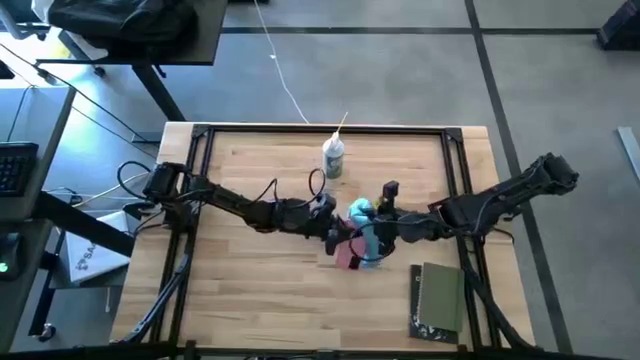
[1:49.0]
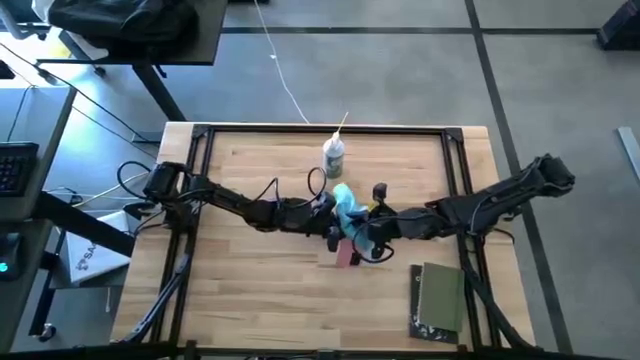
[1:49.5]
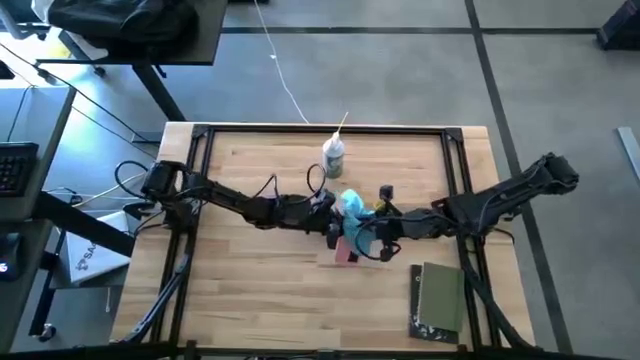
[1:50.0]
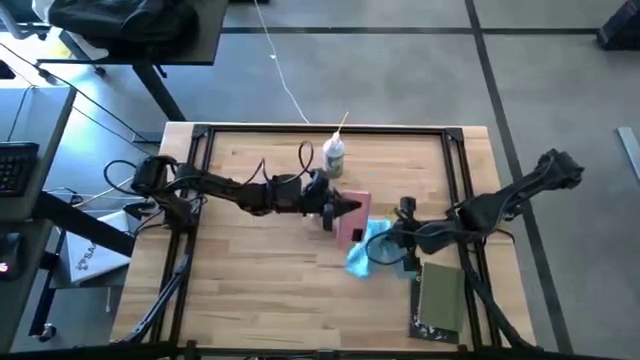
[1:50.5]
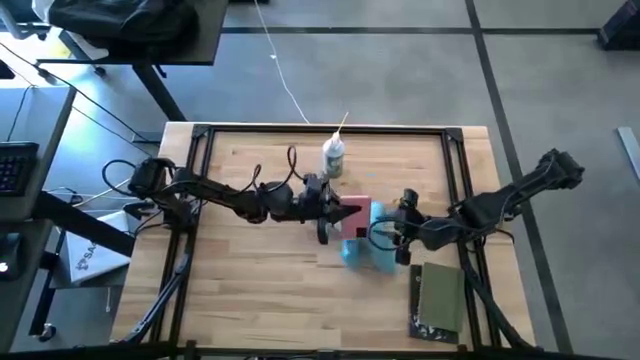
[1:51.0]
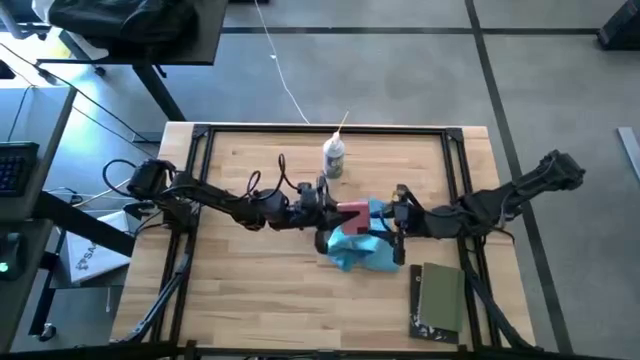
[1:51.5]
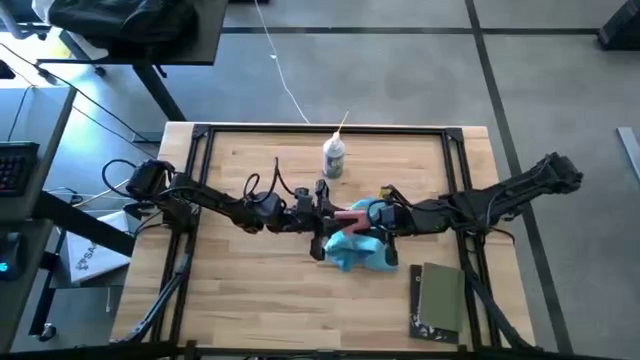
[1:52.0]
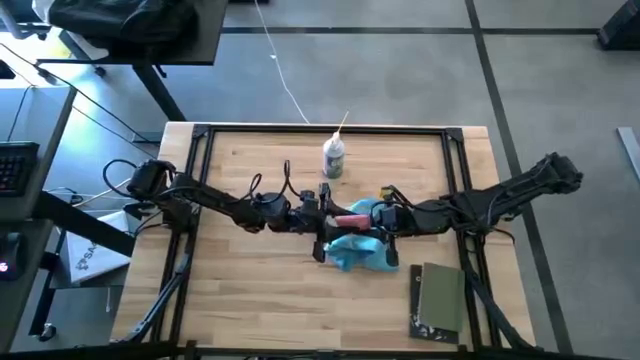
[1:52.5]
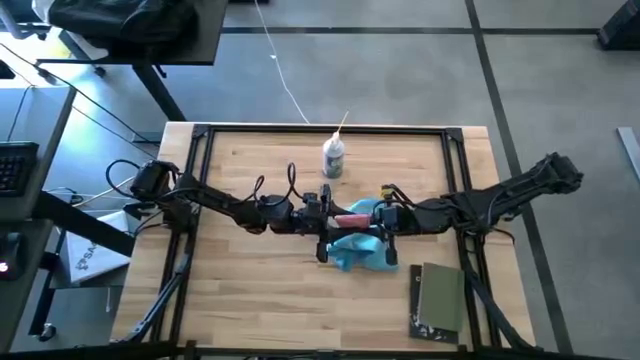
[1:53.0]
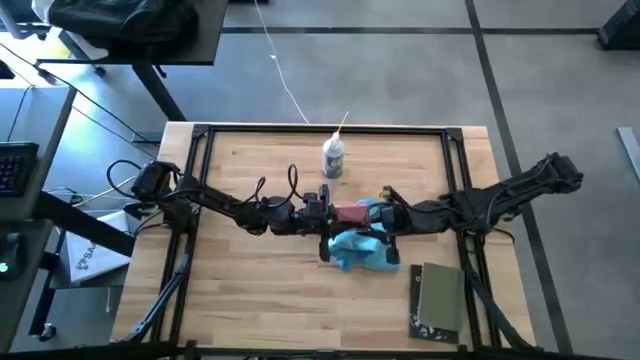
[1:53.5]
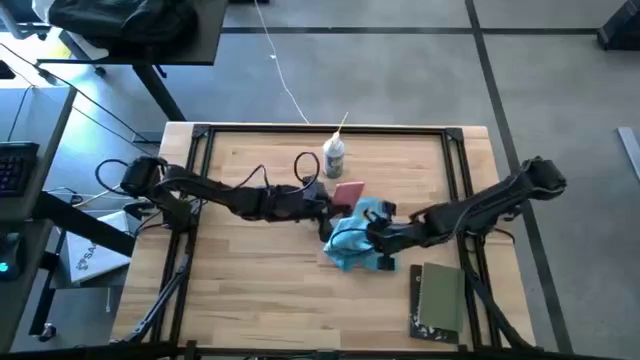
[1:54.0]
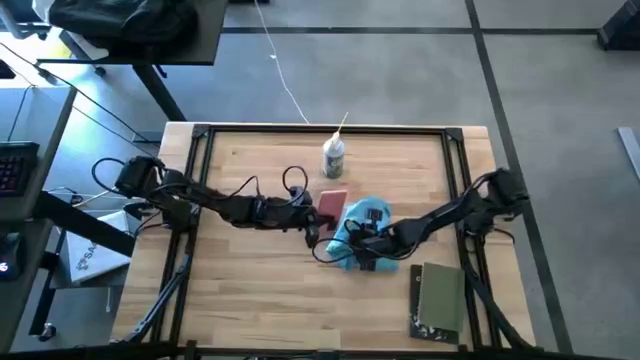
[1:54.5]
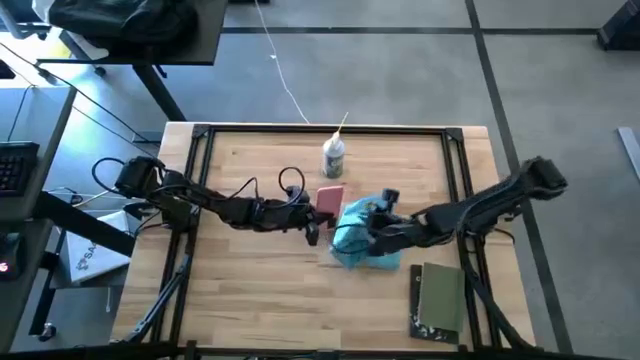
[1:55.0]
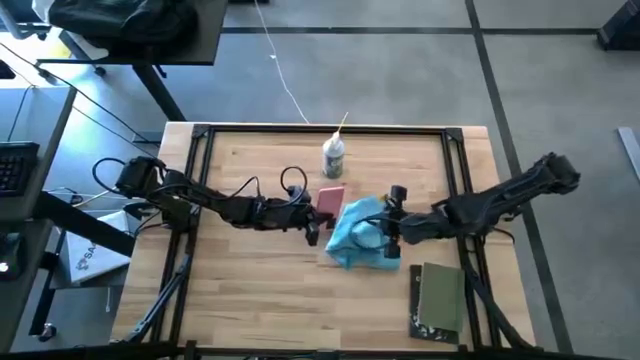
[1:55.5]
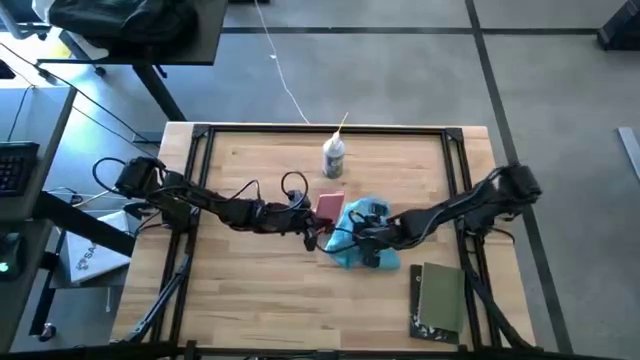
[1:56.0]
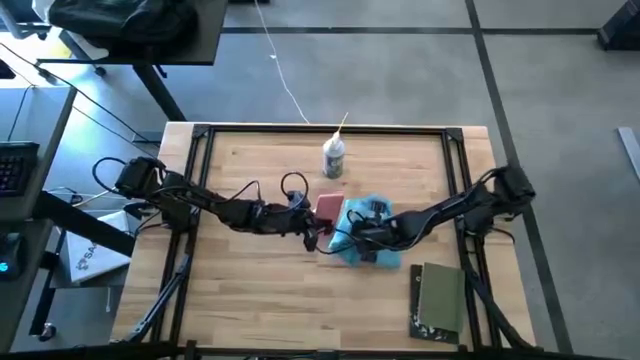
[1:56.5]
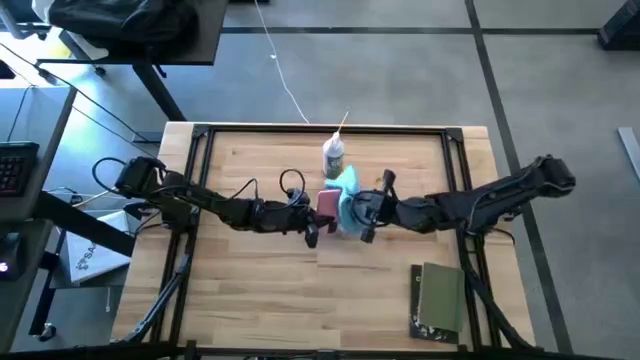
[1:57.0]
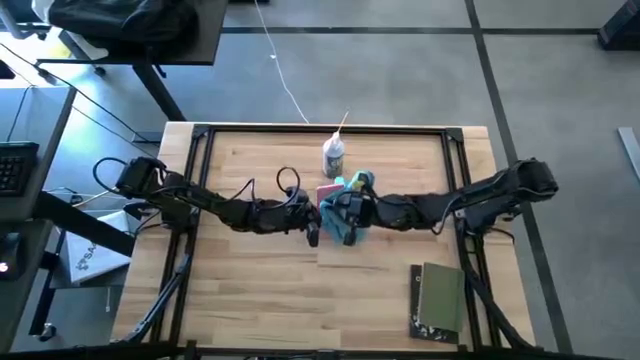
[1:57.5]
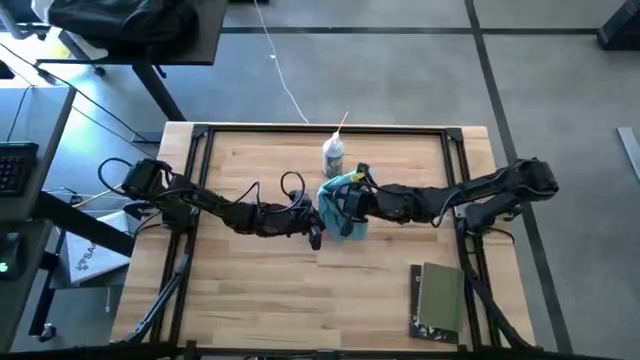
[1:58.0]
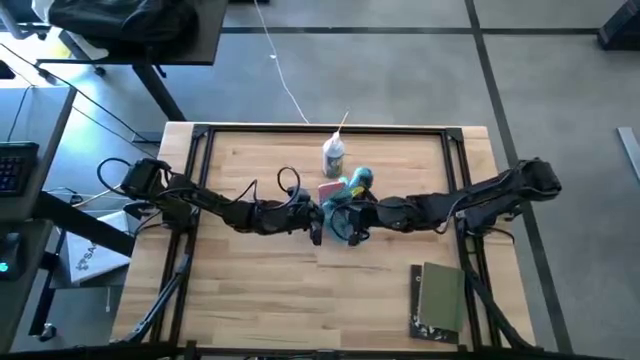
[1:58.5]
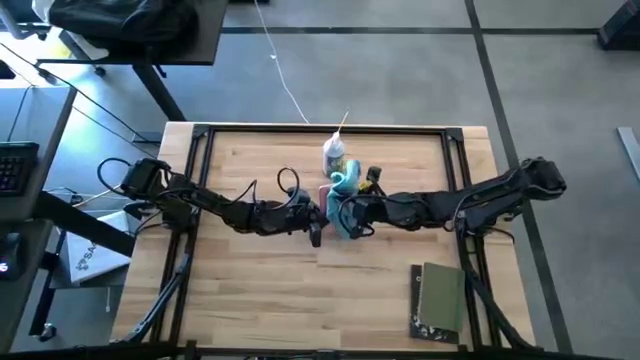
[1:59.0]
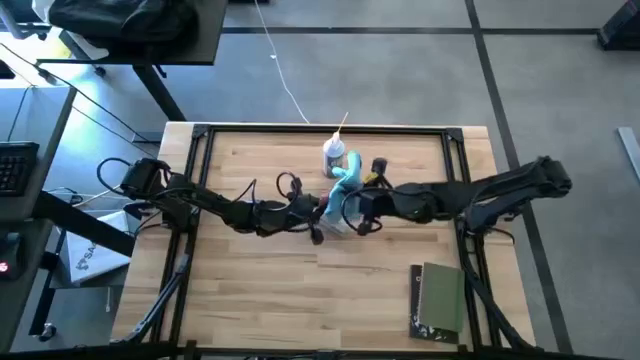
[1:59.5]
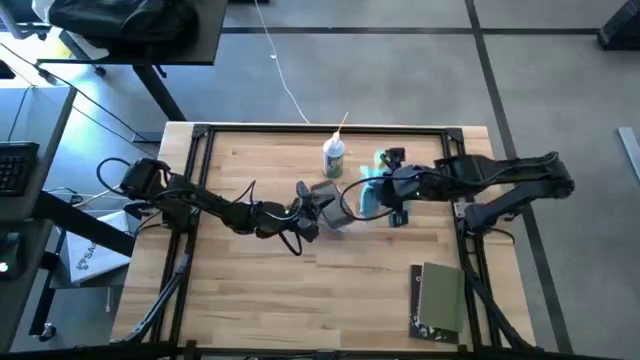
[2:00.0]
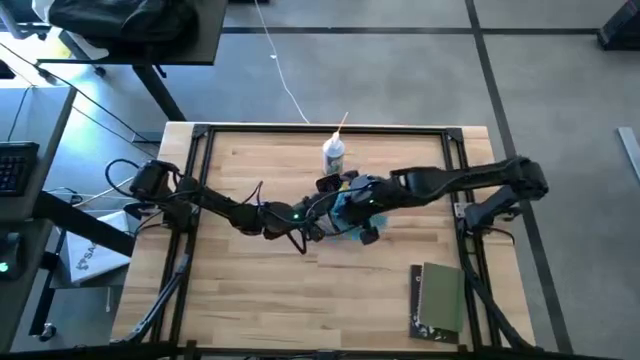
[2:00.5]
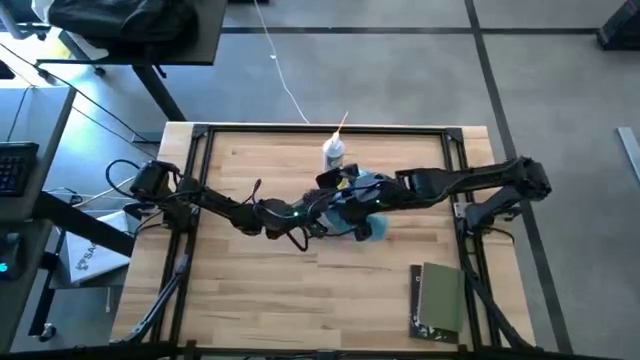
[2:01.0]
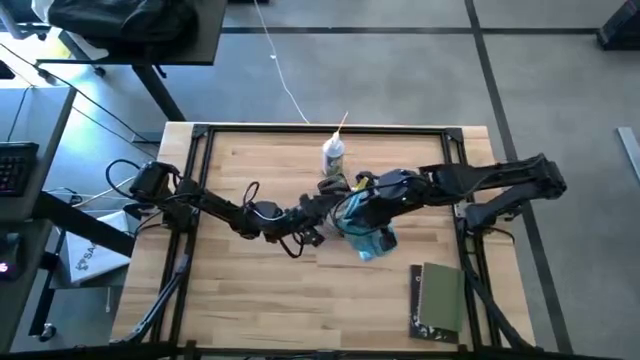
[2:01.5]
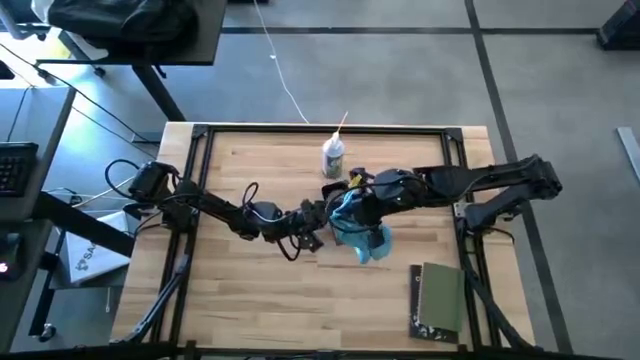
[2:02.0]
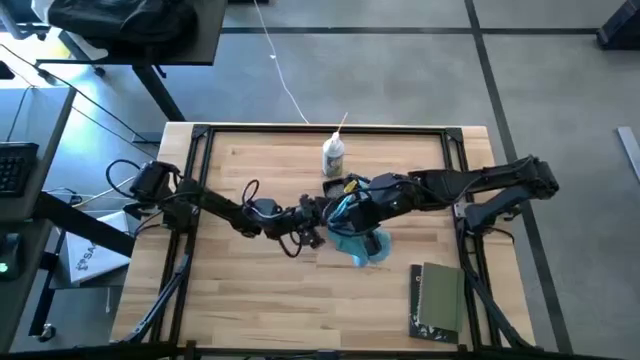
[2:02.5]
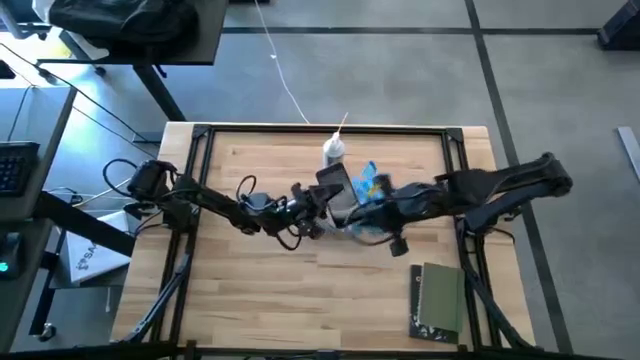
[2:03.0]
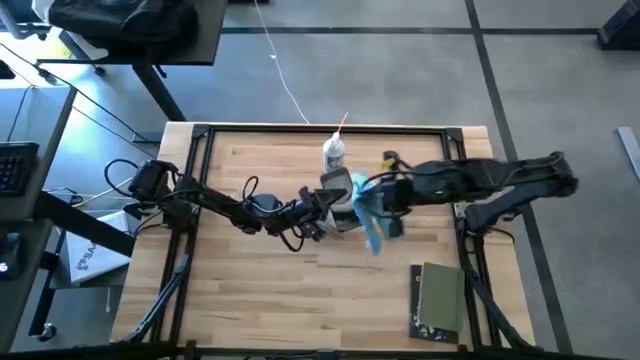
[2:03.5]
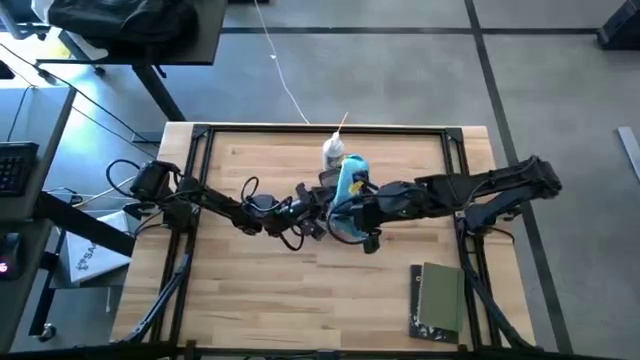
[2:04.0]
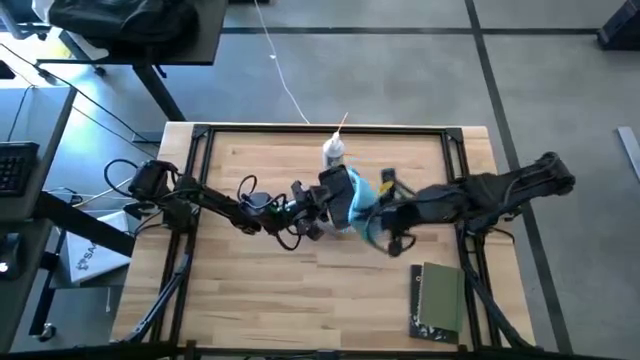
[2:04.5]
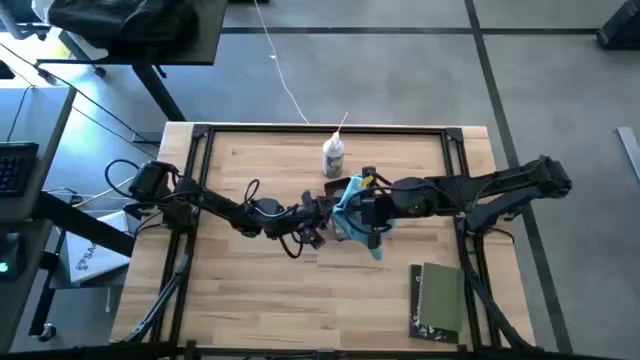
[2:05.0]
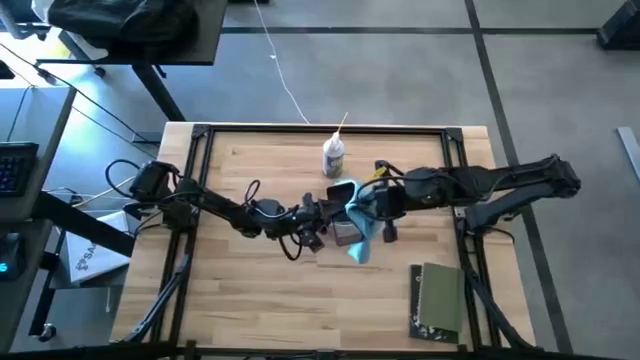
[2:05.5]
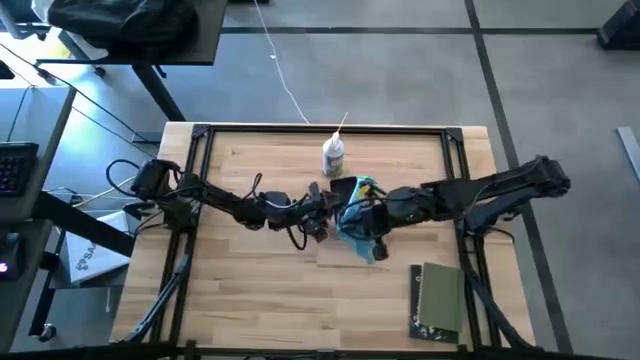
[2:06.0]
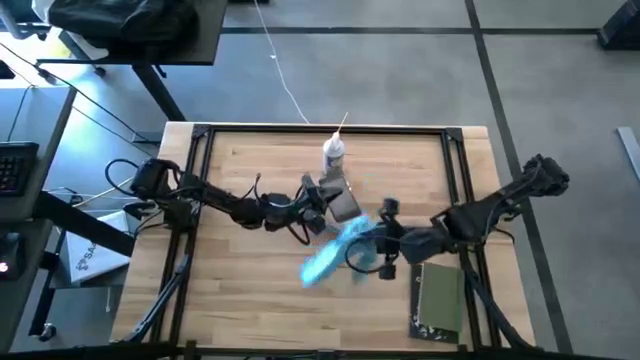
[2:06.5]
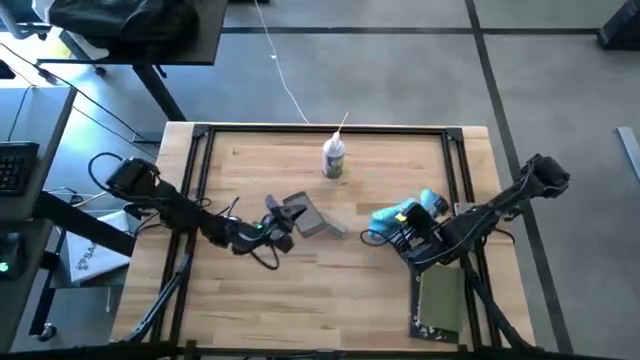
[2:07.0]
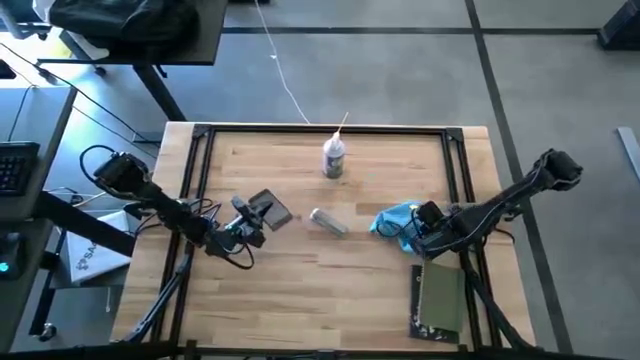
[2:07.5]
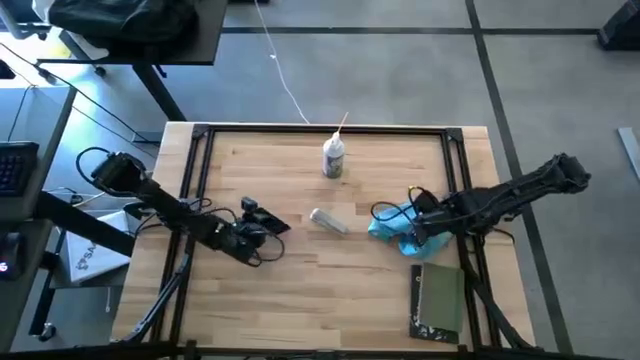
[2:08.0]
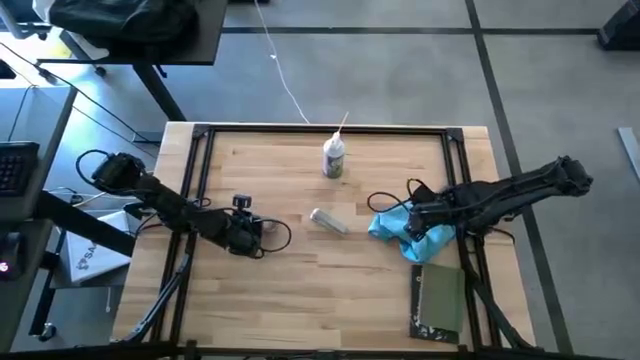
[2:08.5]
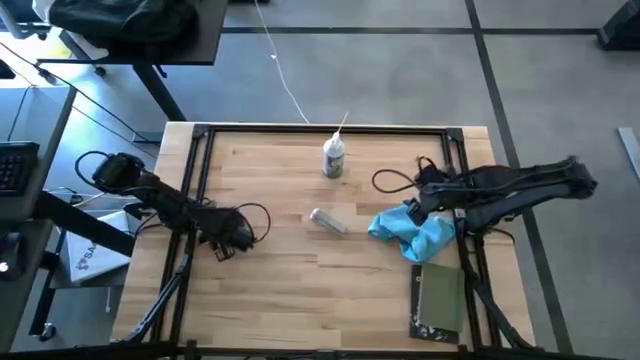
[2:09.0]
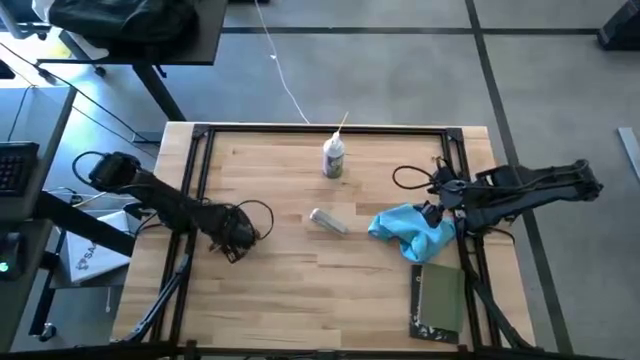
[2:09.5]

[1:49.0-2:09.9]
Task: Apply microfiber cloth
Wipe the pink phone with the blue microfiber cloth
